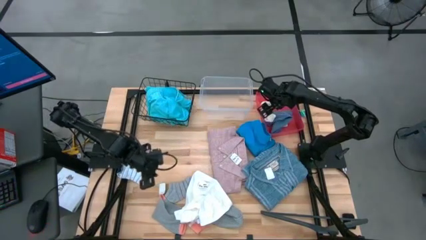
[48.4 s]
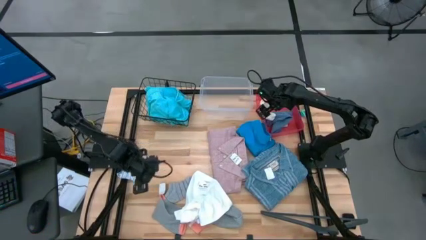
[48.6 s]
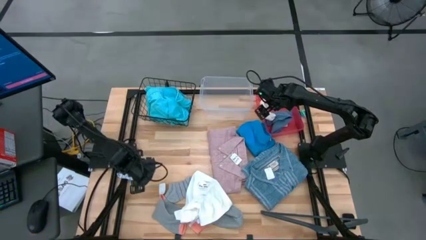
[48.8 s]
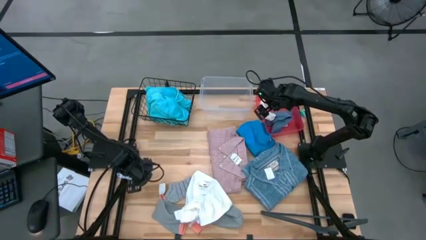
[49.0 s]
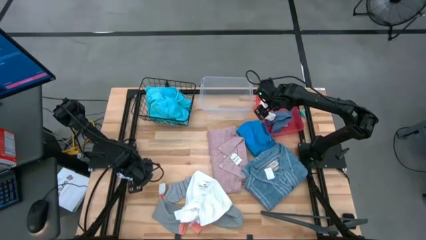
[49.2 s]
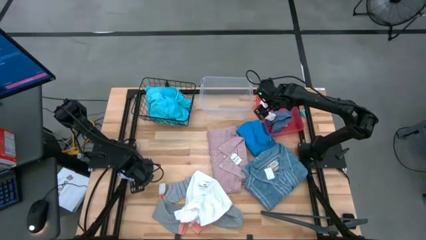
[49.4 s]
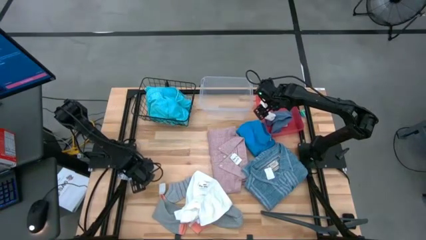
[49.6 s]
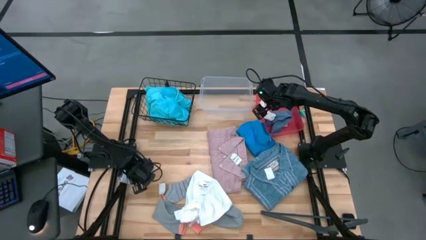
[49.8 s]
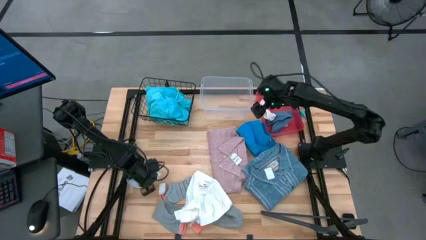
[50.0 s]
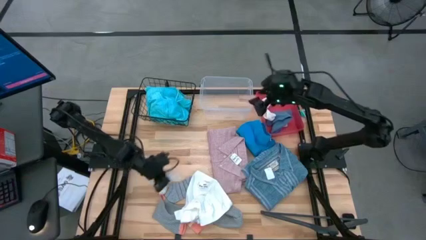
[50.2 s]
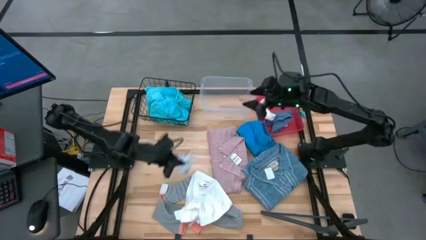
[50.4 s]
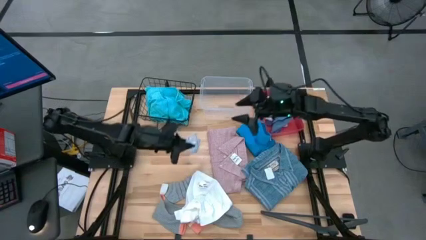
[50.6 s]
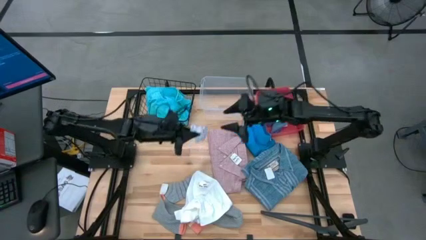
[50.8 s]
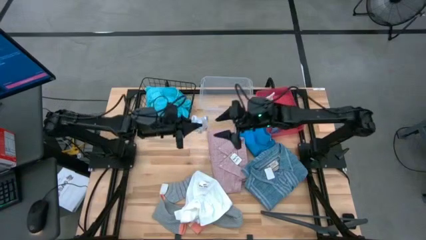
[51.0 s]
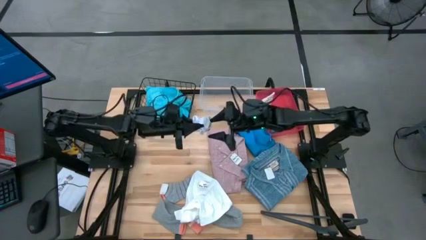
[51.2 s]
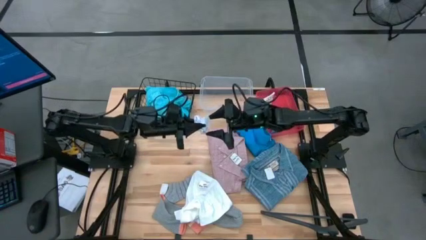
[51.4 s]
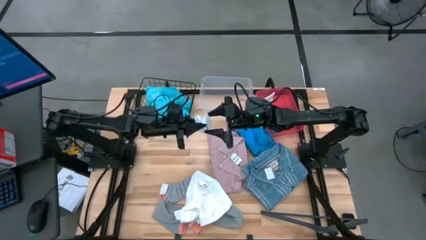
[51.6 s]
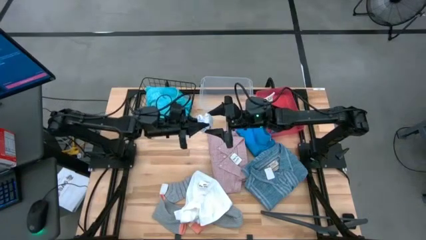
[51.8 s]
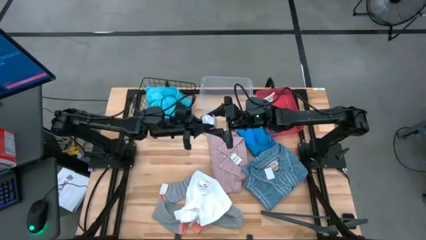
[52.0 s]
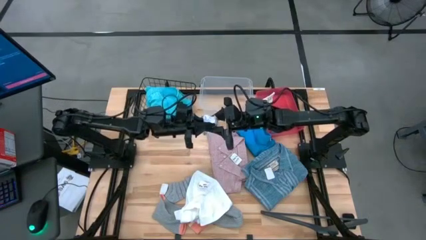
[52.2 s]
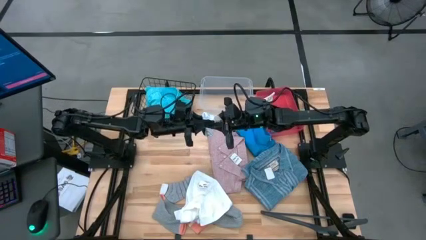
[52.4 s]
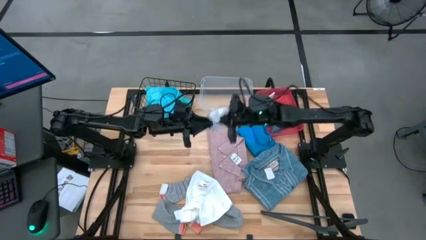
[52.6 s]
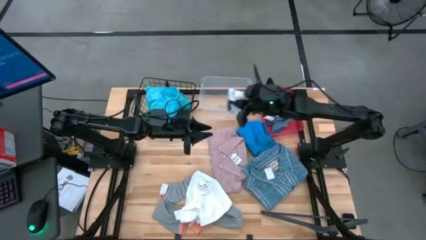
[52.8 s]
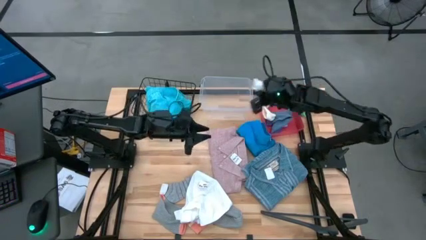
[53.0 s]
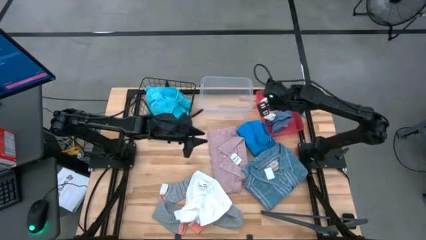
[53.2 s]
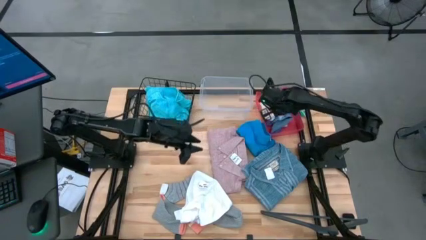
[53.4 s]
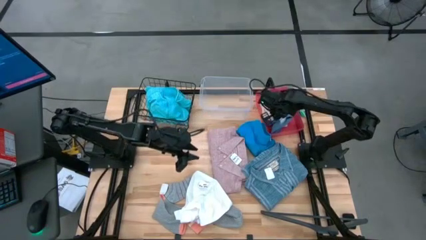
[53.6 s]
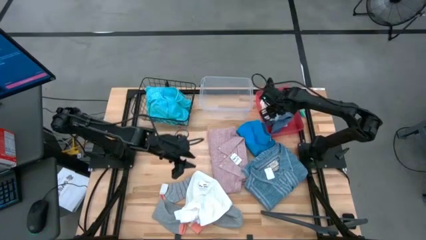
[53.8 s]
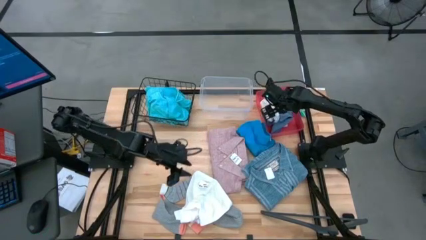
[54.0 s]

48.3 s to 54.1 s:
Task: Pick & Place Cloths
Put the white patterned sock into the red bin

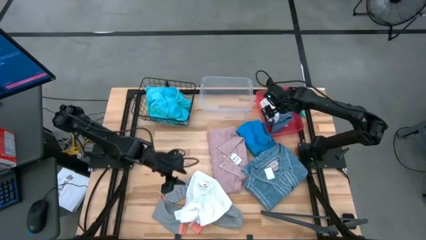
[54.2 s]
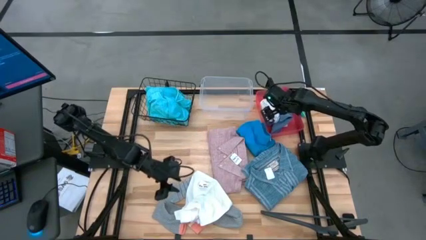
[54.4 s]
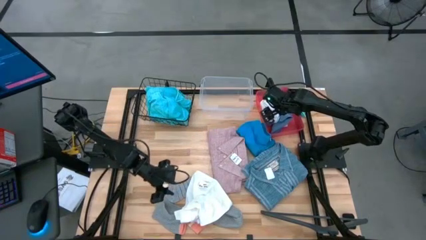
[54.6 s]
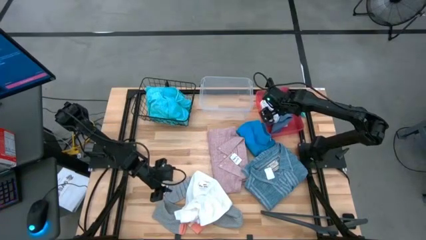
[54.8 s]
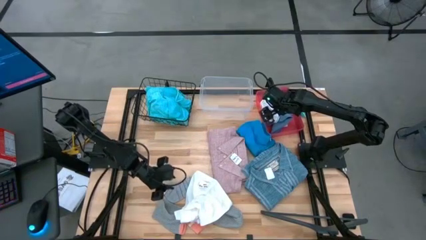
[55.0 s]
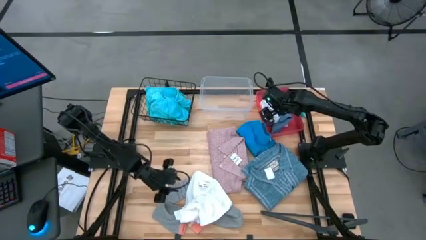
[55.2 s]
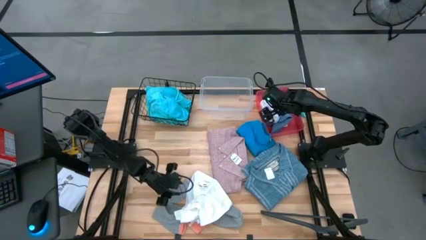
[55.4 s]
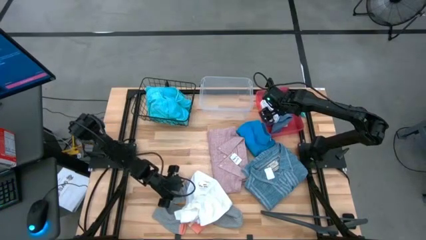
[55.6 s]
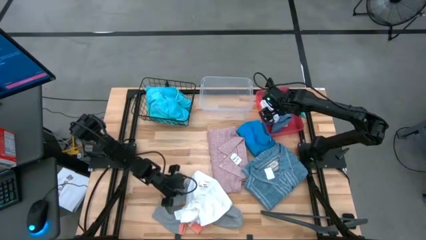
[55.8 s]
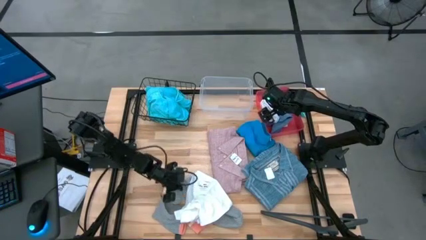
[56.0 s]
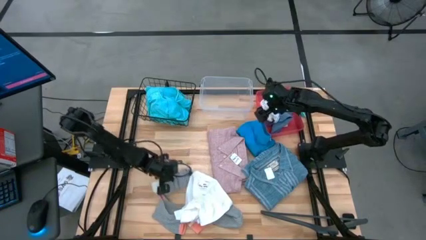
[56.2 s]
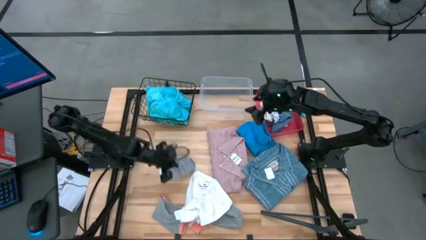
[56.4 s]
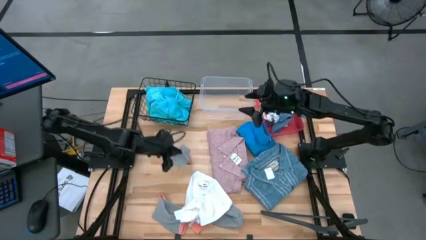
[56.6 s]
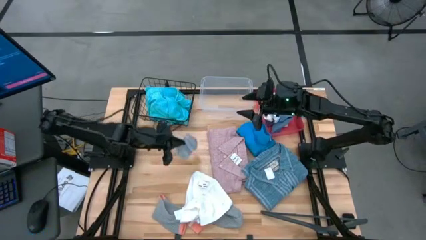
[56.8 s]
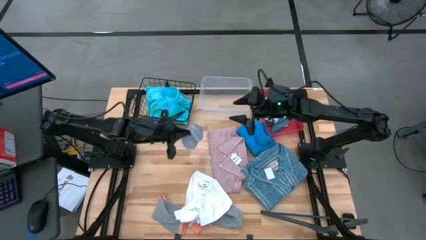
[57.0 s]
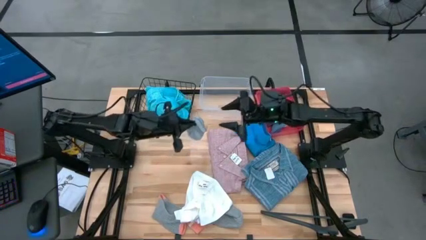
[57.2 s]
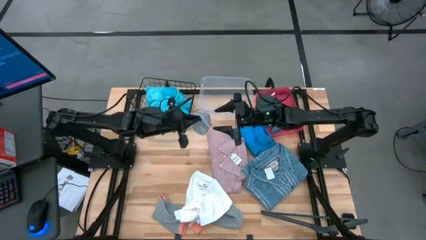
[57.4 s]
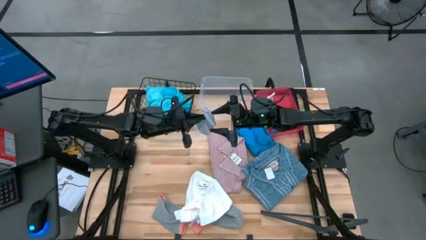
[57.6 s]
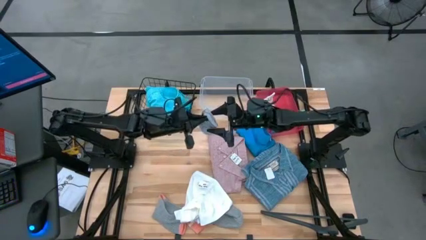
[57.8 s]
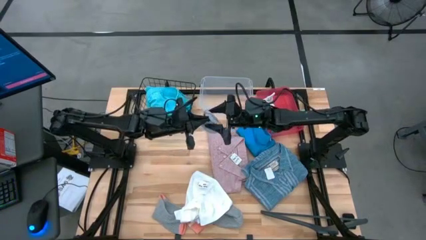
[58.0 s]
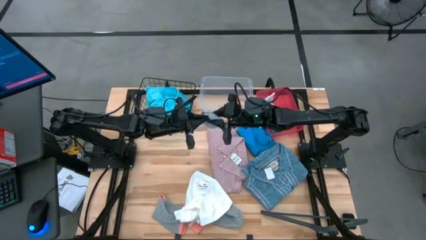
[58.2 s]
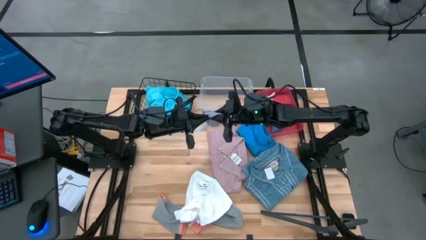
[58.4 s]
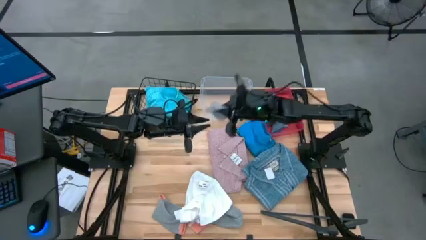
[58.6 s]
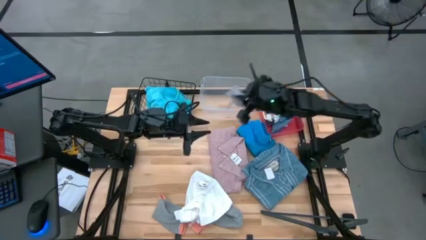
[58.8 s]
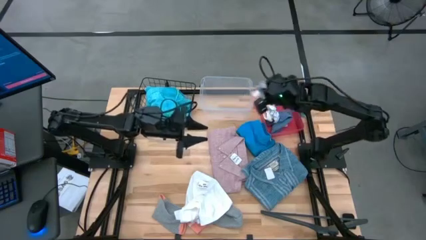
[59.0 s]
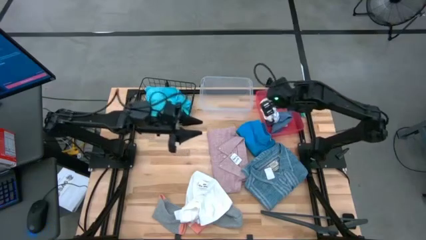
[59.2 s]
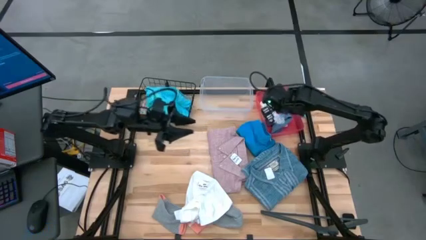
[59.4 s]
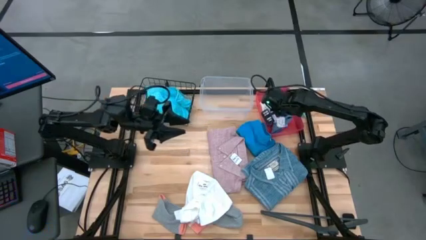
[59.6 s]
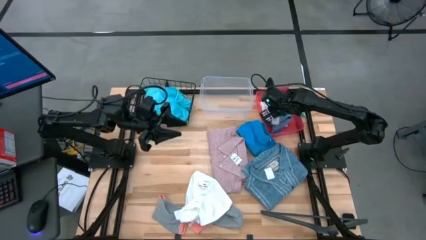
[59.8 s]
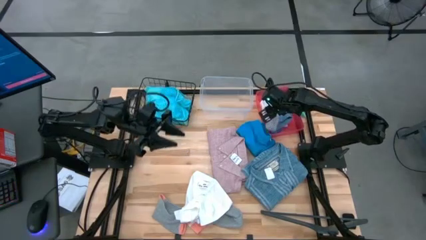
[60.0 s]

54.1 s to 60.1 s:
Put the gray patterned sock into the red bin

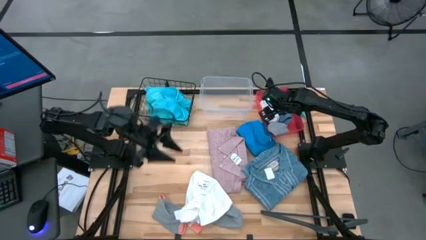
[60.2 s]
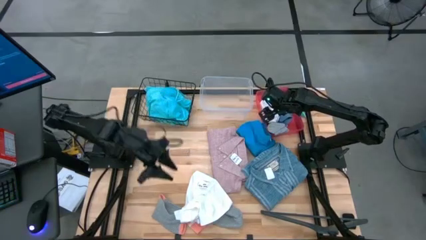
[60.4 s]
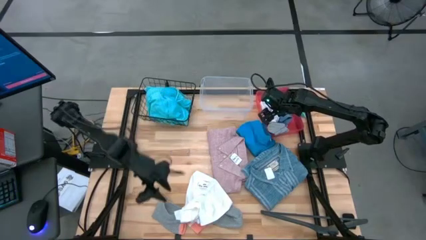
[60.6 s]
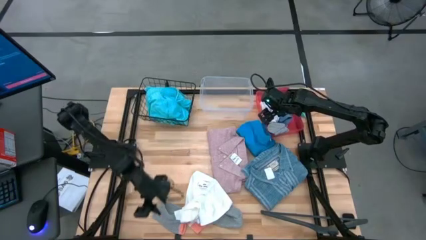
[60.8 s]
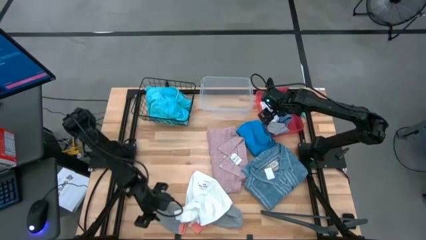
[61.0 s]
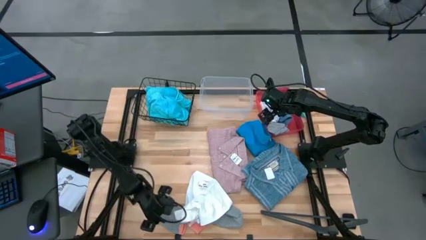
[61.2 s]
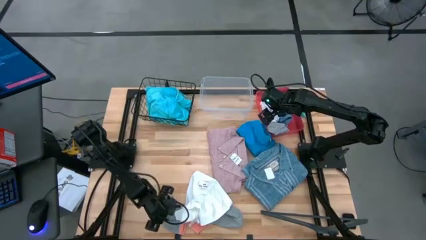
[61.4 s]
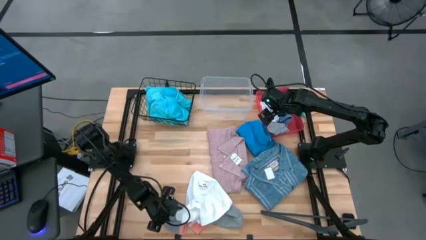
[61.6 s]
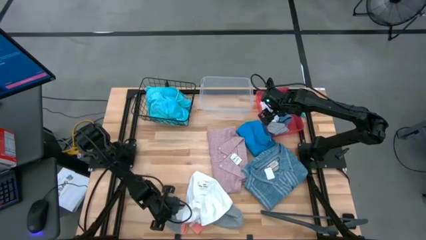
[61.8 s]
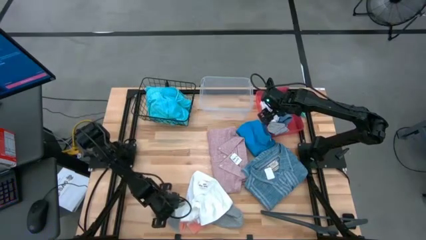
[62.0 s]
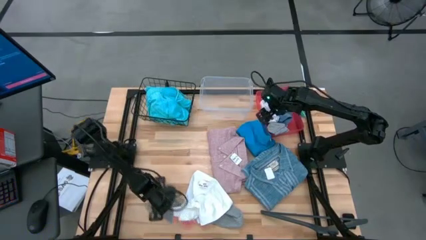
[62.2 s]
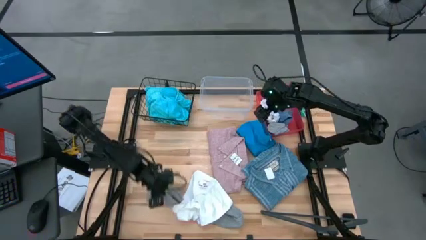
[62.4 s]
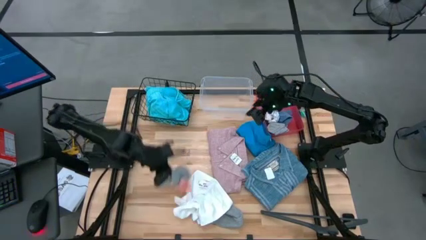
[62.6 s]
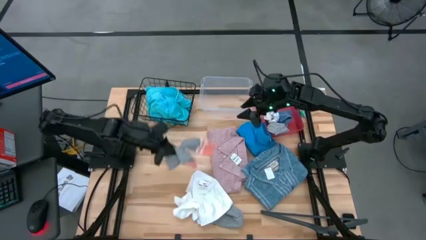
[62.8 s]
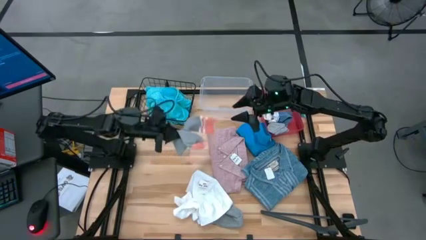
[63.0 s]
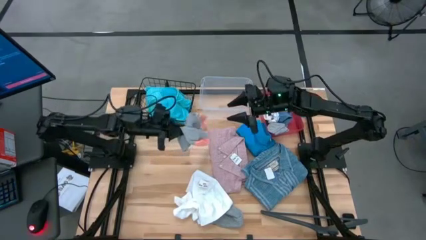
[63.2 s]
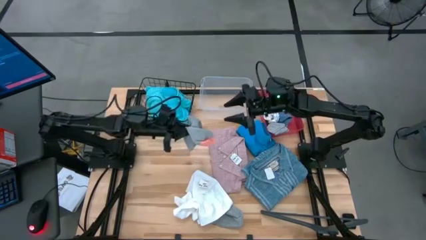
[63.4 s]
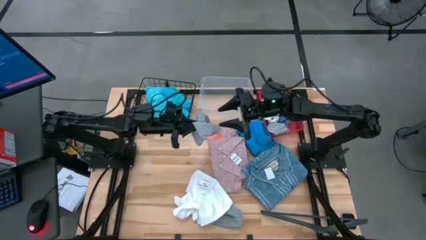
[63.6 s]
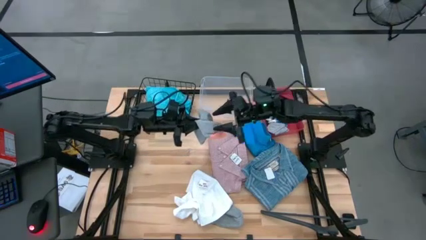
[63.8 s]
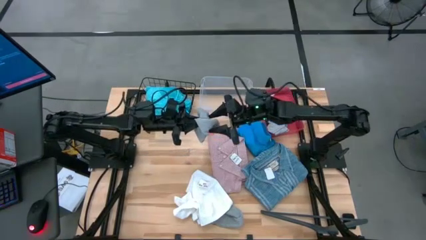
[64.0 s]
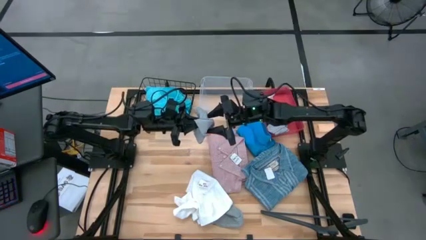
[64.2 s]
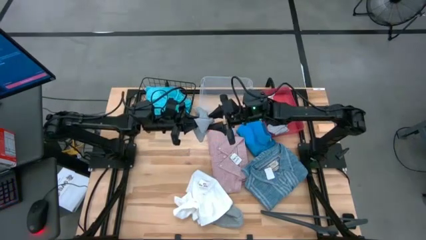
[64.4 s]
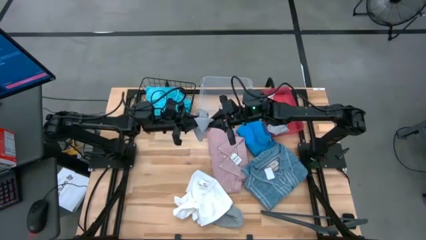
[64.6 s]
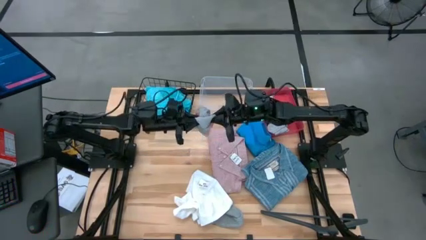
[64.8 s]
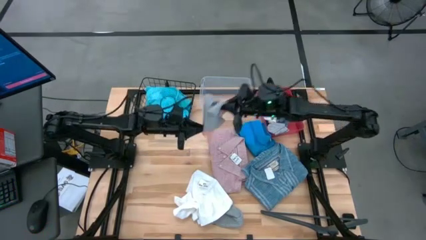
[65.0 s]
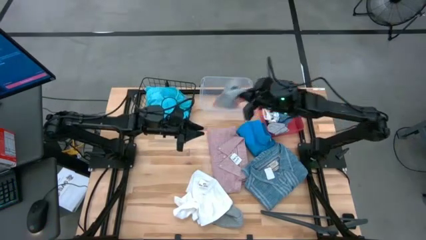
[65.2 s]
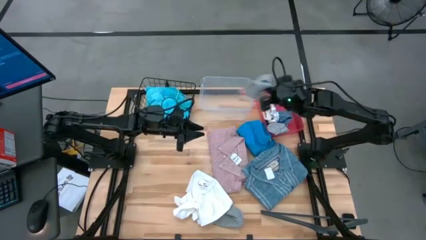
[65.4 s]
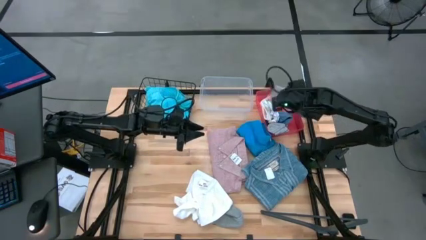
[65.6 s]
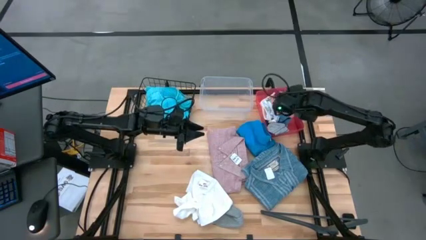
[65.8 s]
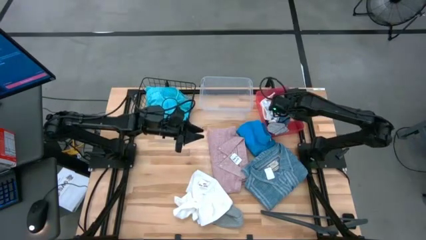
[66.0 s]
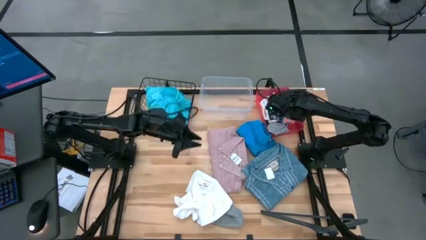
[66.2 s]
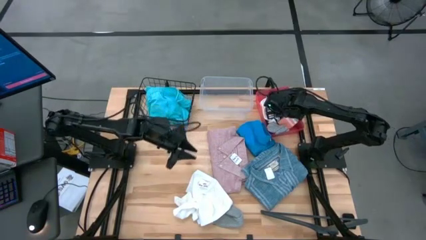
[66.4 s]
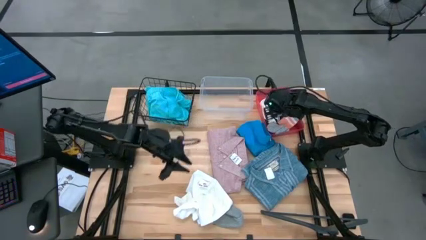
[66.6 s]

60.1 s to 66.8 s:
Put the left gray sock into the red bin
